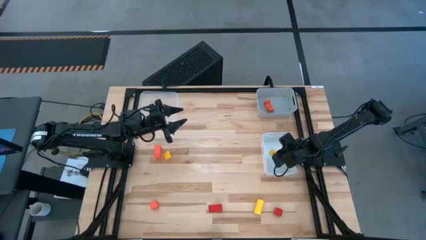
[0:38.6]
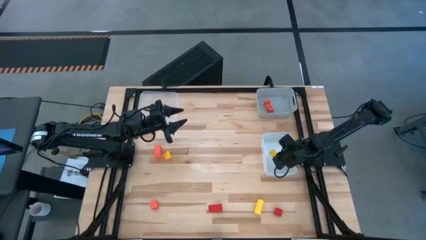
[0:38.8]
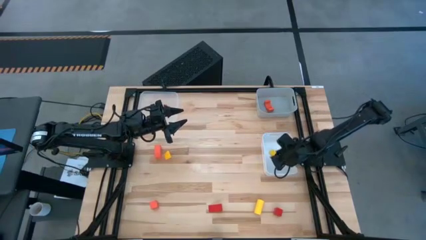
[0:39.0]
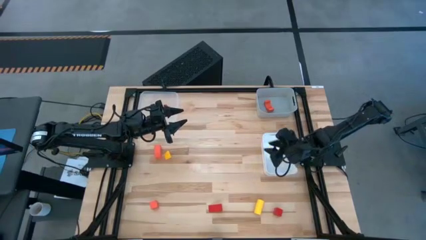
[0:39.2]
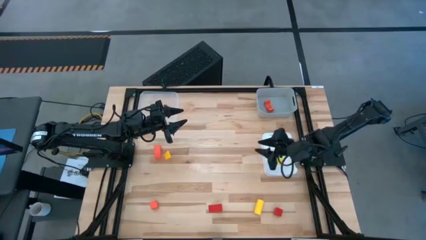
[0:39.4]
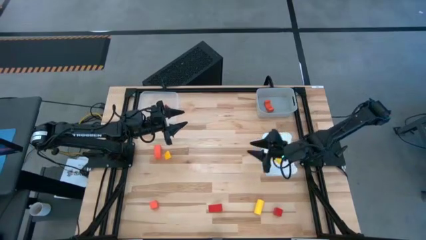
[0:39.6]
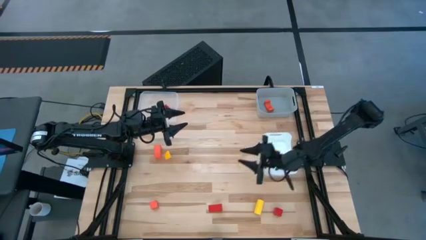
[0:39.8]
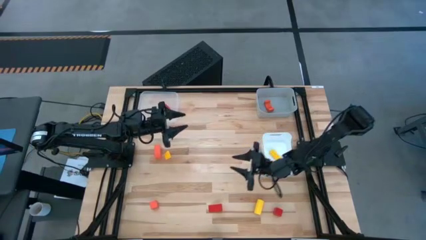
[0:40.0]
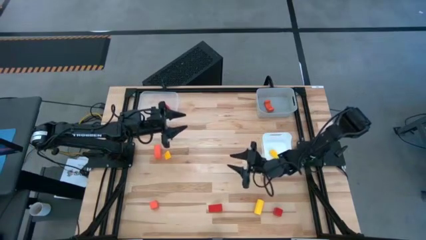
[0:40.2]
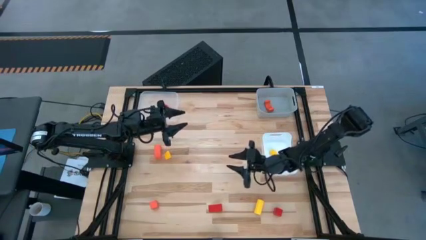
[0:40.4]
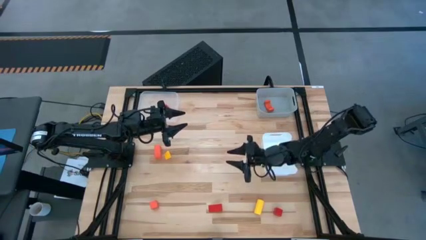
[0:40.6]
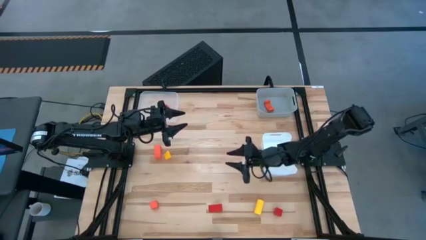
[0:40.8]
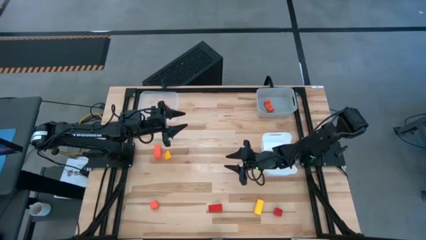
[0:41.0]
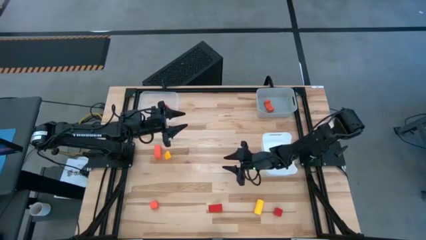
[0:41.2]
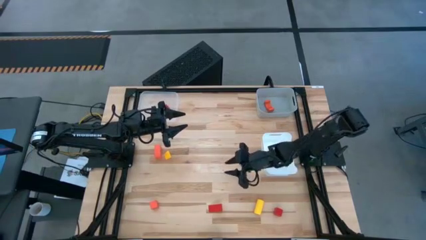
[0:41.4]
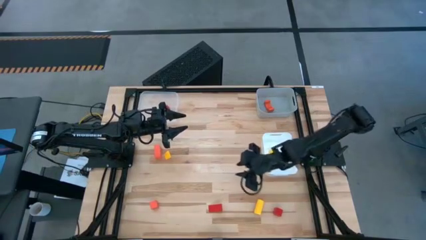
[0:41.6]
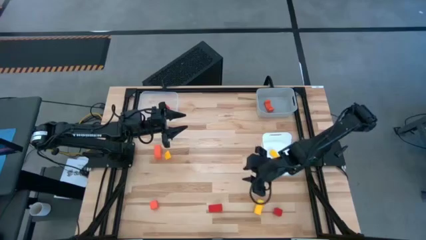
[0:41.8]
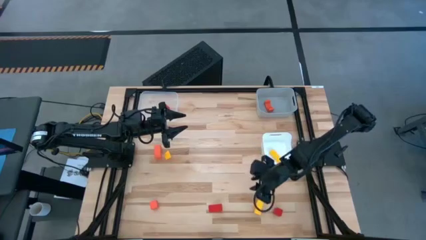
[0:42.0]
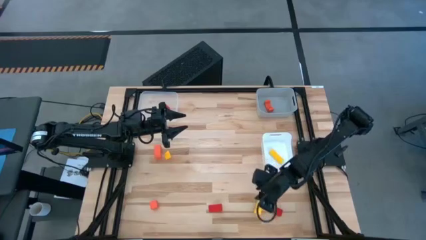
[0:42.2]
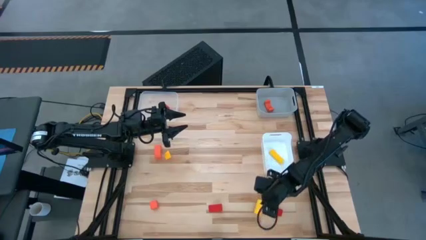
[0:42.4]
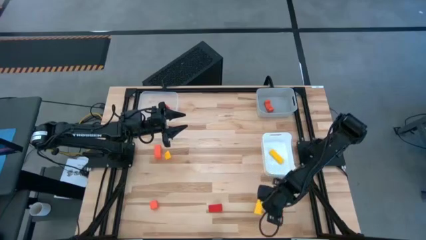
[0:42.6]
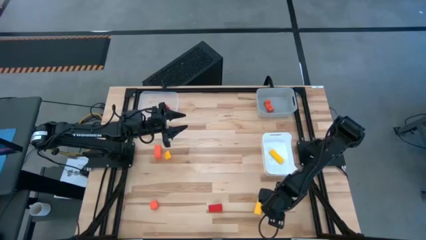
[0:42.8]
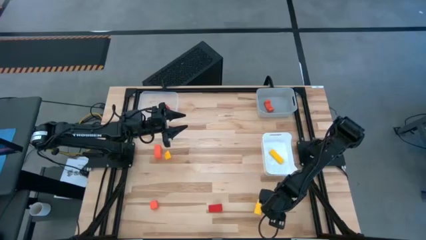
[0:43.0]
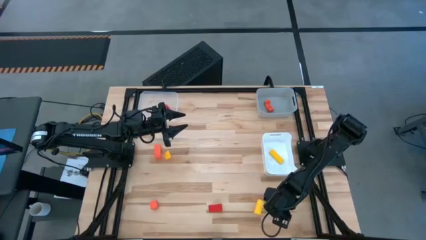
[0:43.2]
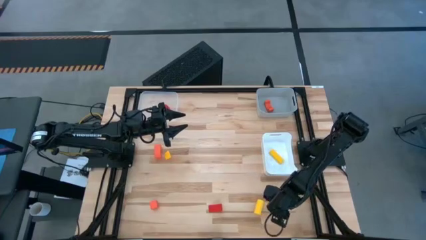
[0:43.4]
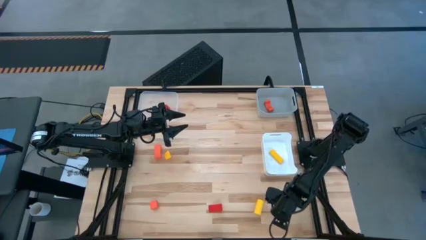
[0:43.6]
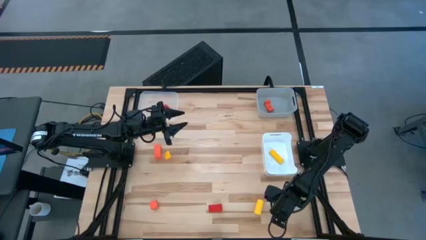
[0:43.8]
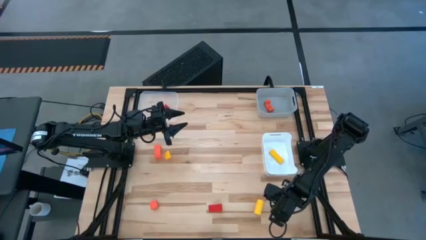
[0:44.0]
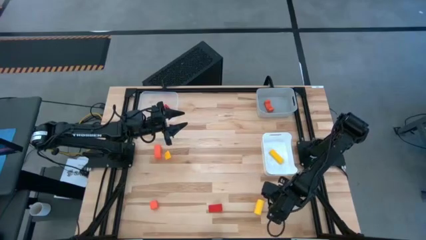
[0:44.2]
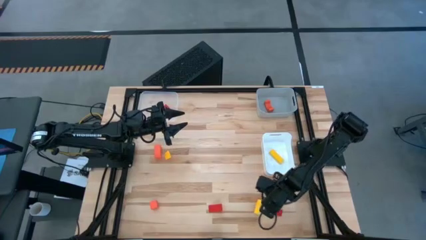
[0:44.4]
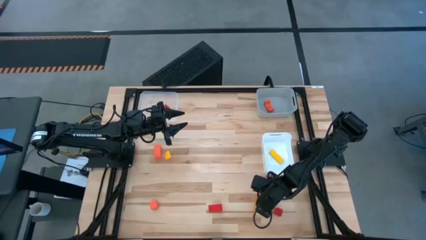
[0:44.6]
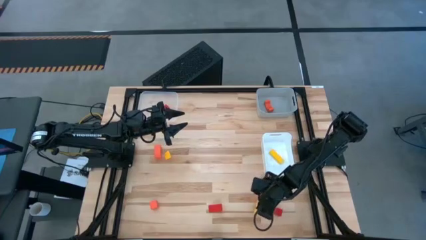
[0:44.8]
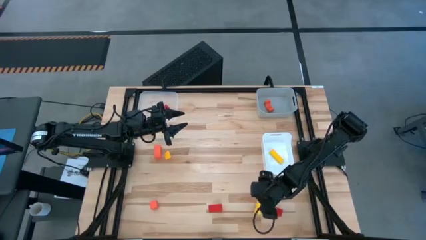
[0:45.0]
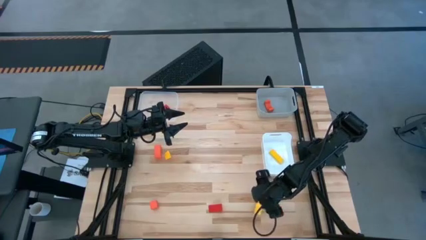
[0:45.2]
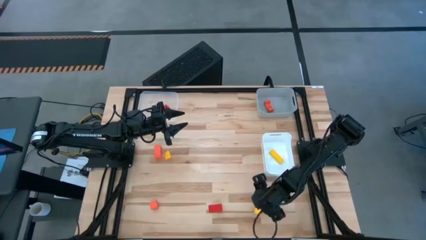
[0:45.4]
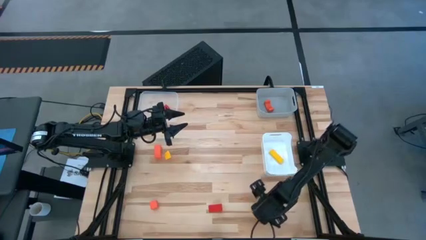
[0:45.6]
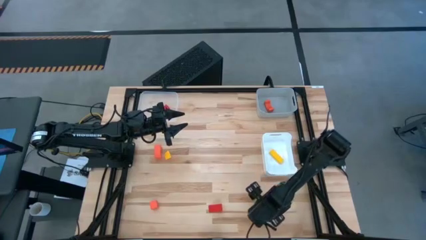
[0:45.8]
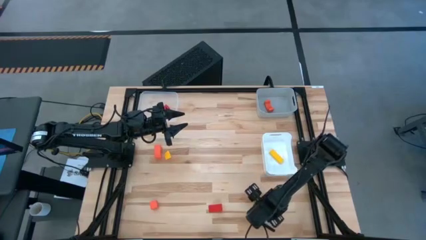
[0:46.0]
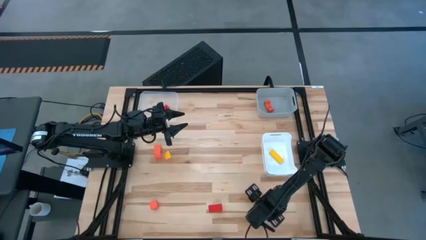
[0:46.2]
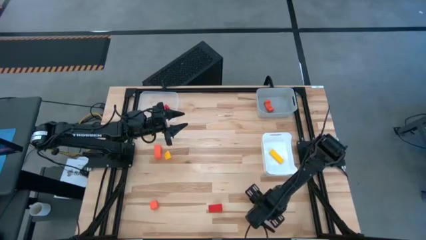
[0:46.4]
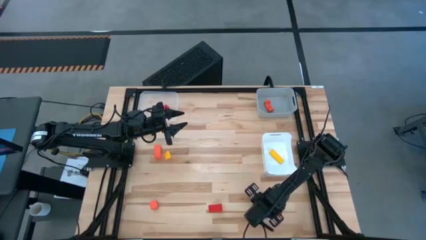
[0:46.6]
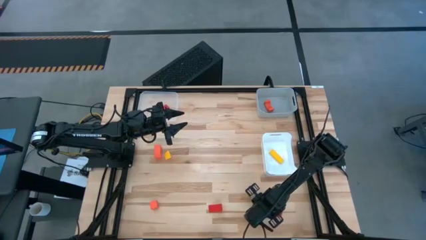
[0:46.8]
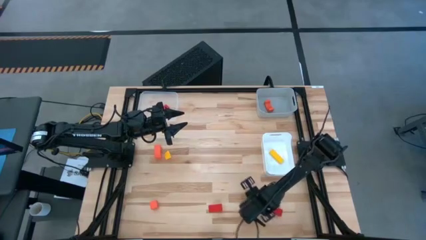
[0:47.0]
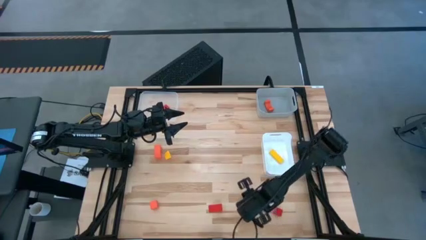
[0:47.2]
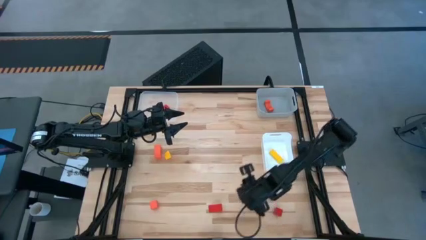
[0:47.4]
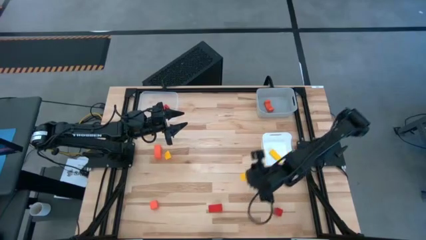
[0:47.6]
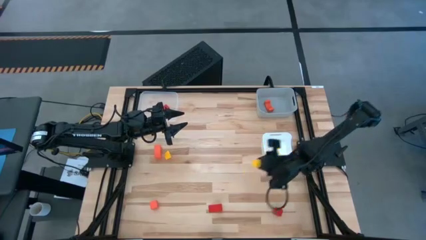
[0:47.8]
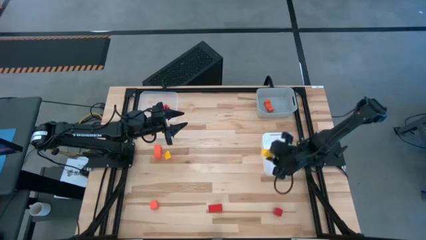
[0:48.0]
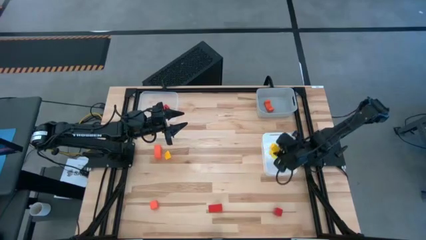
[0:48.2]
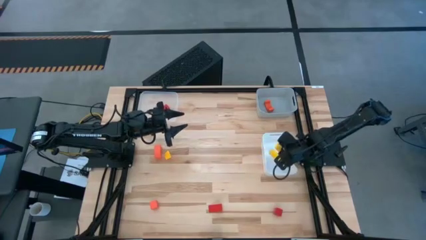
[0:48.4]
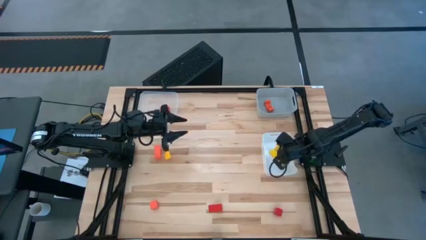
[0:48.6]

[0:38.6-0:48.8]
Task: Sort & place blocks by color
Put the right yellow block into the white bin

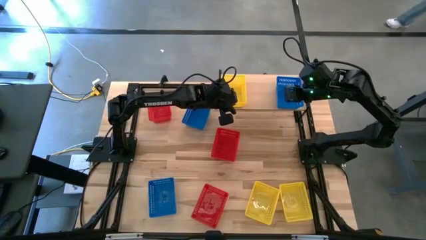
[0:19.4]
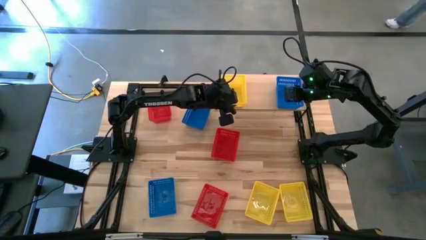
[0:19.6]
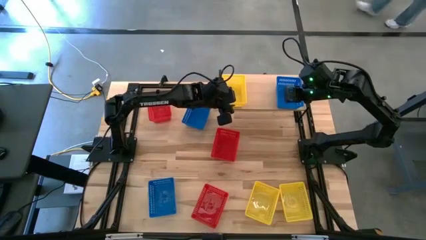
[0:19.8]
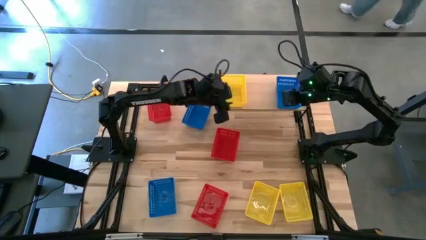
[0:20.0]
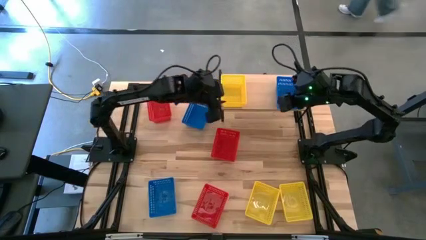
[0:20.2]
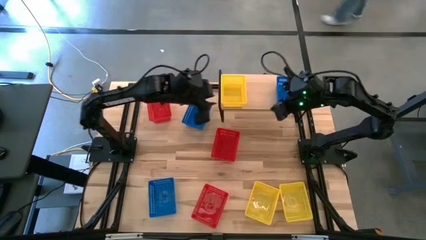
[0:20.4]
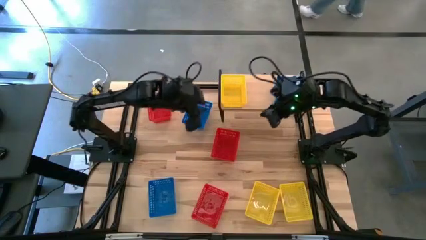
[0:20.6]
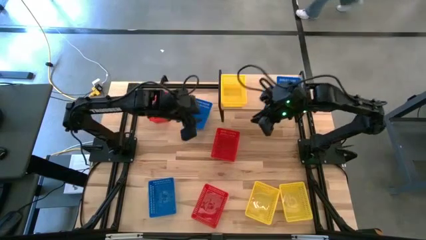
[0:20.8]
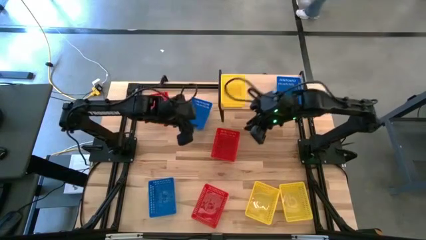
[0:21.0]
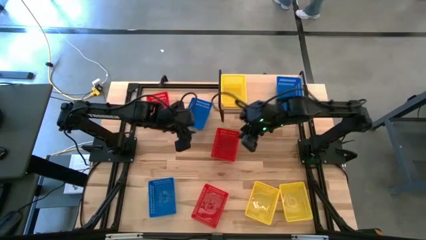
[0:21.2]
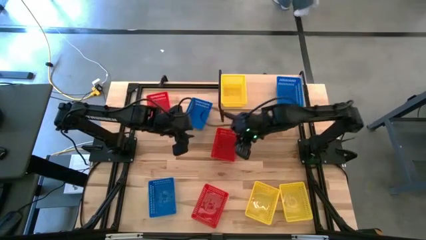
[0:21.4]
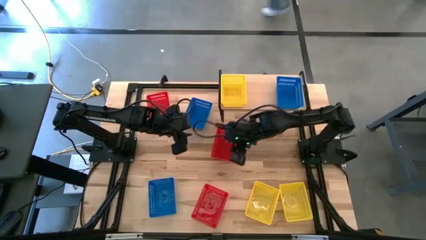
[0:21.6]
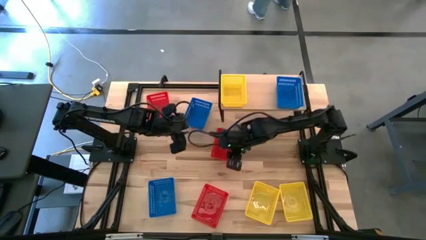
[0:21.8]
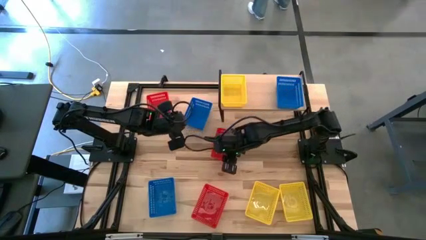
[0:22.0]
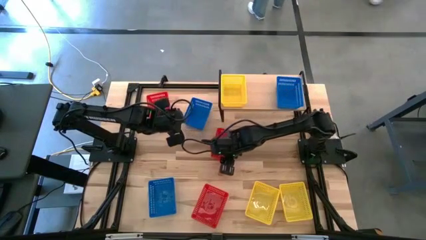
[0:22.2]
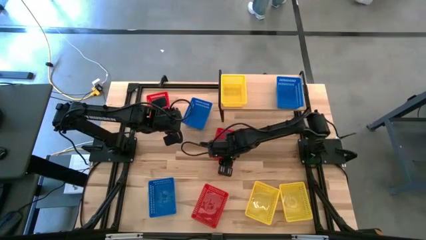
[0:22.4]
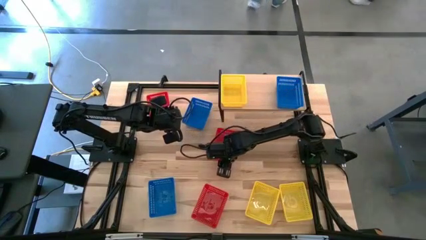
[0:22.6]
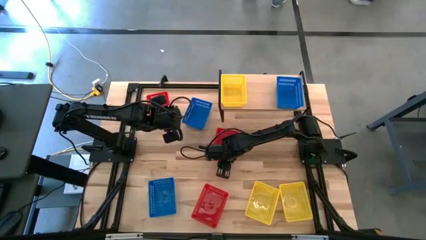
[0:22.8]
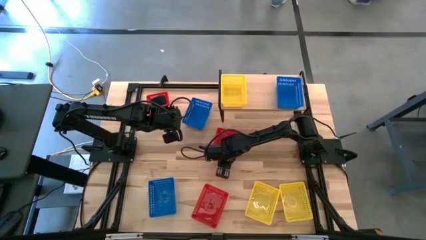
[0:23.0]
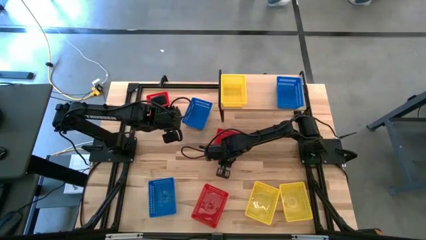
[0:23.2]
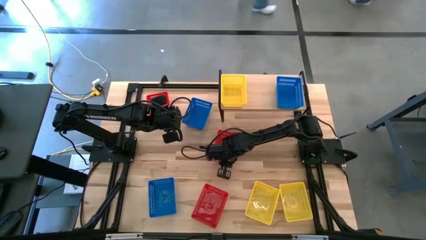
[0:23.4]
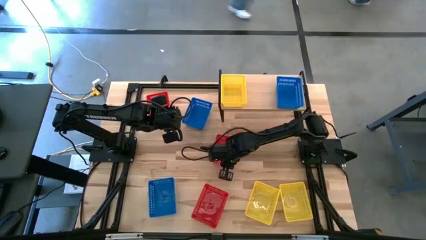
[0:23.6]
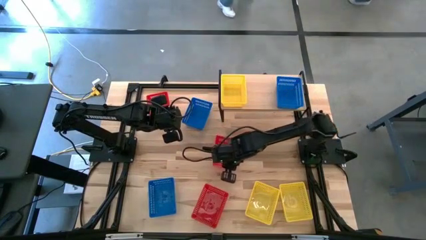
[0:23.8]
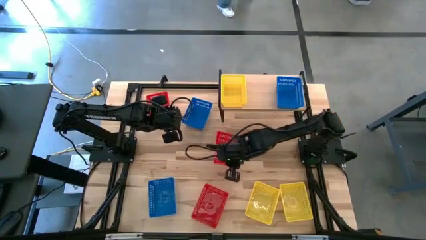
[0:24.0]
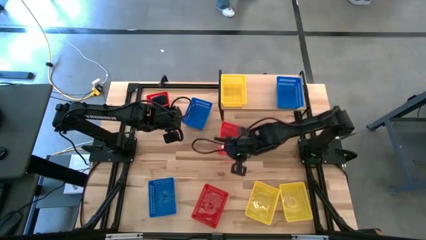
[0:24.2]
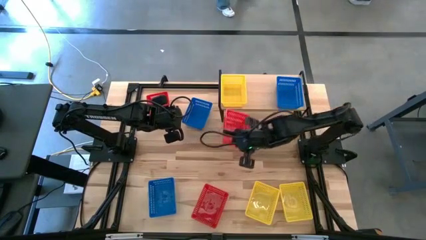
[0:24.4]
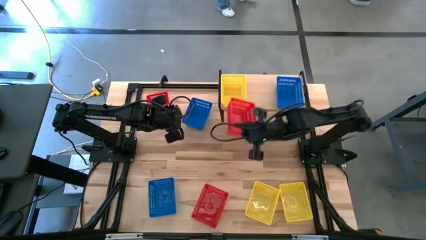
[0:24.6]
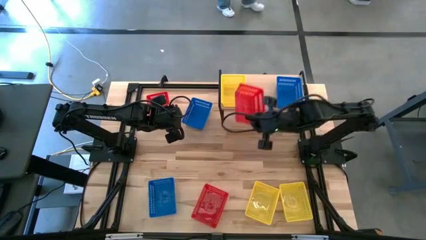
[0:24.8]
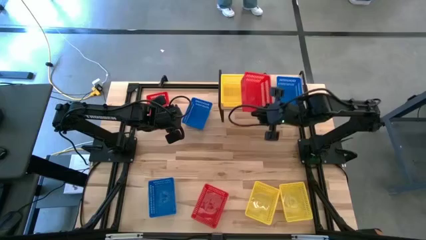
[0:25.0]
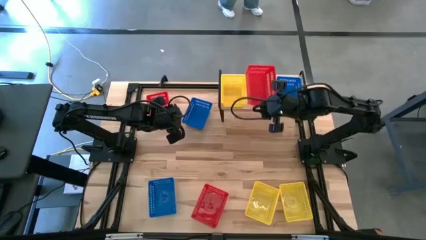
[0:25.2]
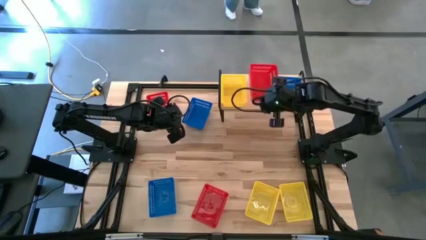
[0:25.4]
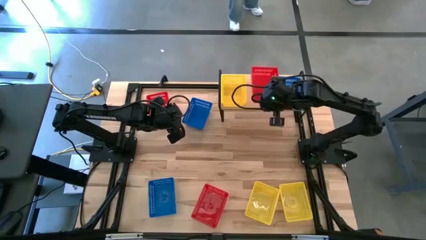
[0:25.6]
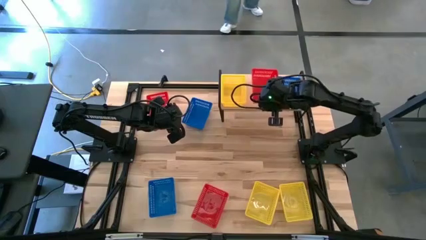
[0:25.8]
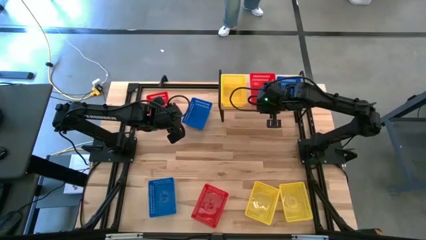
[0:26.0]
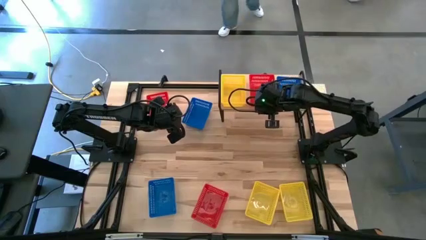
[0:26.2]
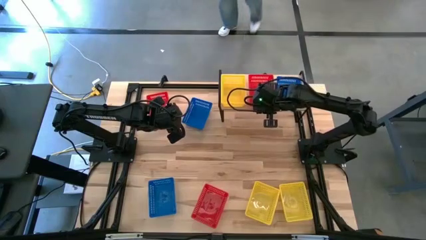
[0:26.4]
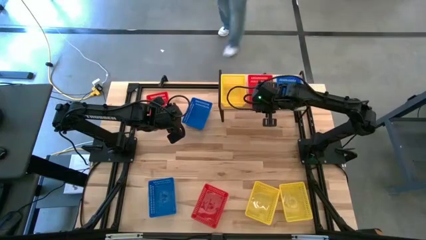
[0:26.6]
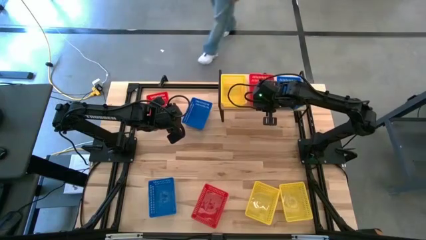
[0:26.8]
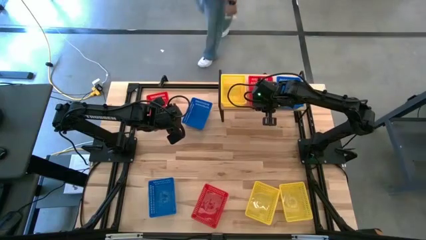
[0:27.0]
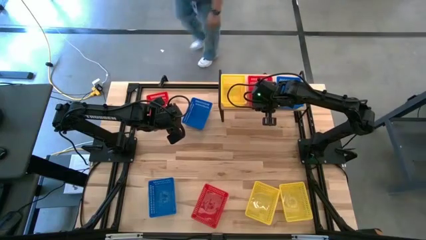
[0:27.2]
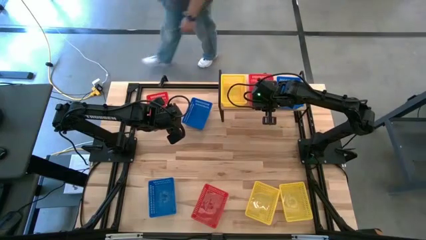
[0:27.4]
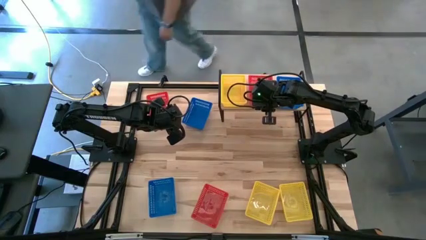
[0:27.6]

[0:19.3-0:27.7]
Task: Stack baskets on shelf by color
Put the middle red basket on the shelf
